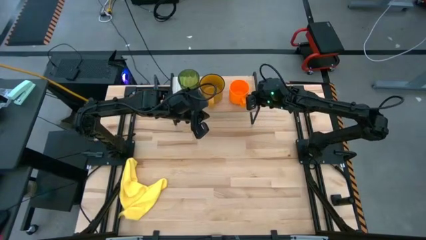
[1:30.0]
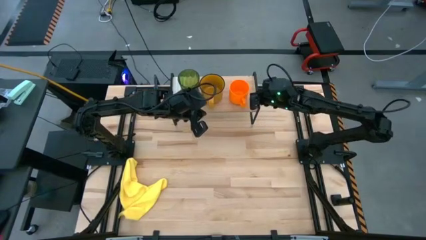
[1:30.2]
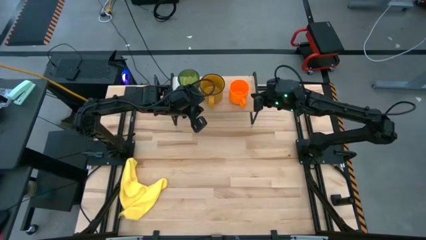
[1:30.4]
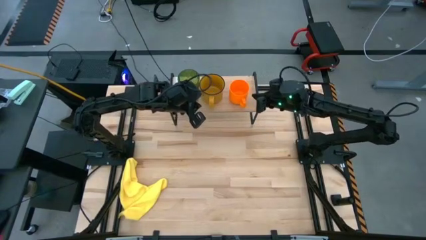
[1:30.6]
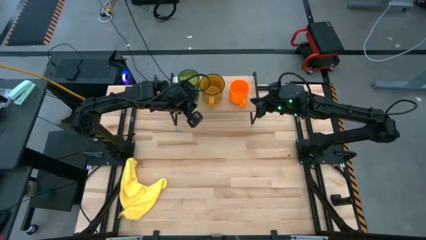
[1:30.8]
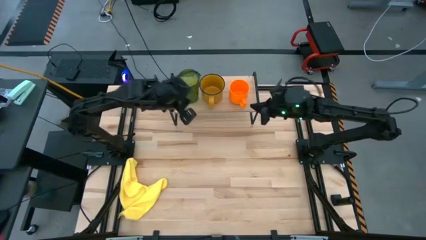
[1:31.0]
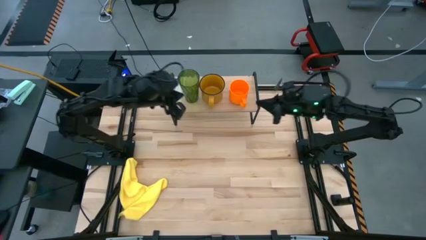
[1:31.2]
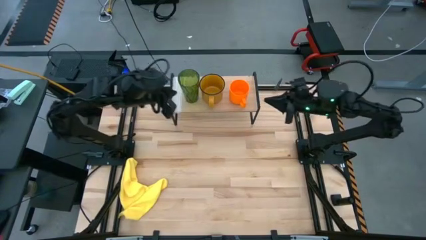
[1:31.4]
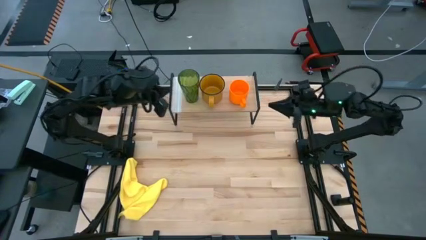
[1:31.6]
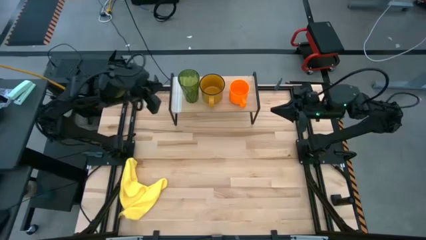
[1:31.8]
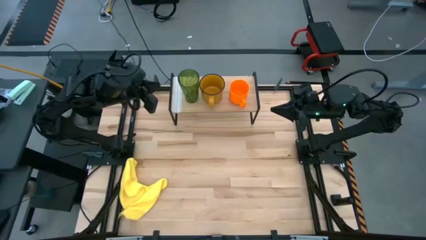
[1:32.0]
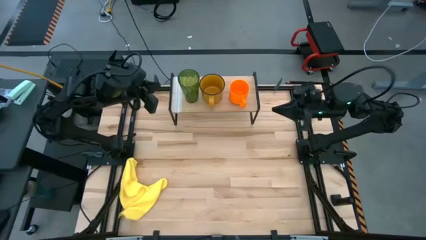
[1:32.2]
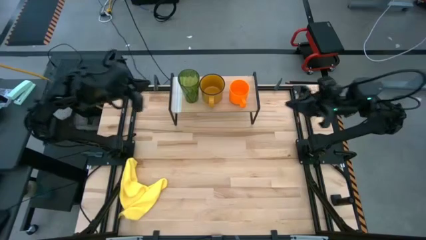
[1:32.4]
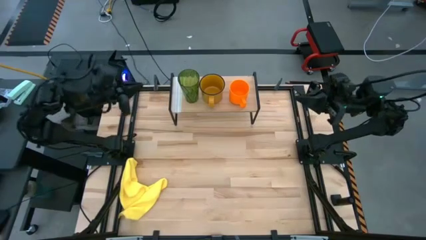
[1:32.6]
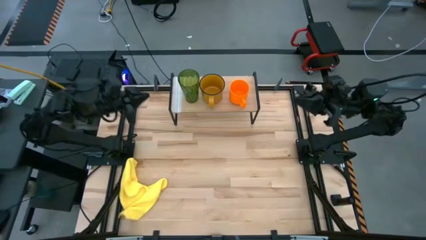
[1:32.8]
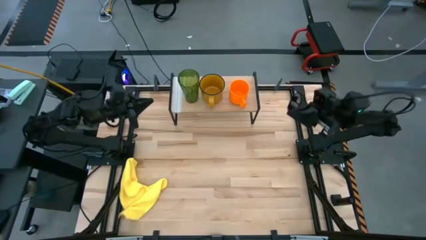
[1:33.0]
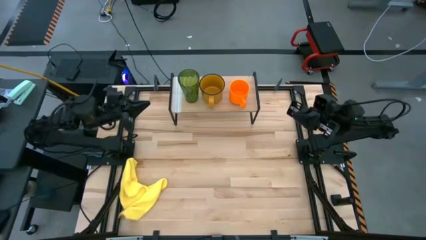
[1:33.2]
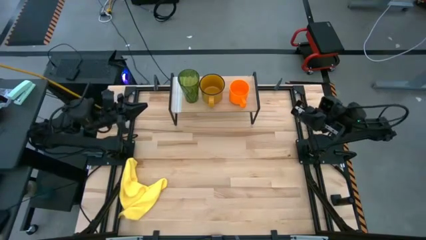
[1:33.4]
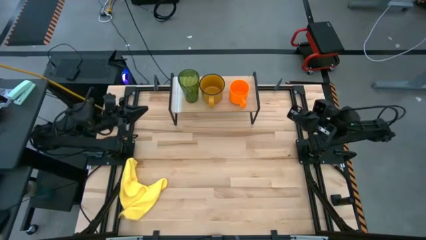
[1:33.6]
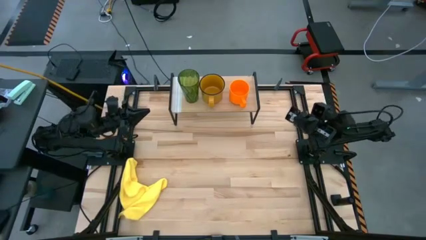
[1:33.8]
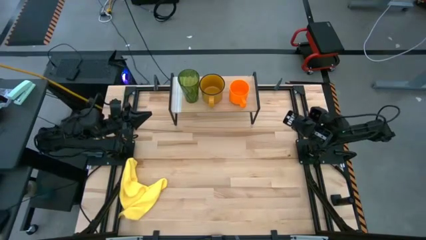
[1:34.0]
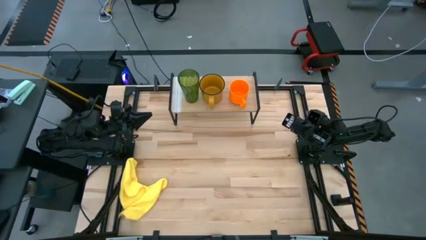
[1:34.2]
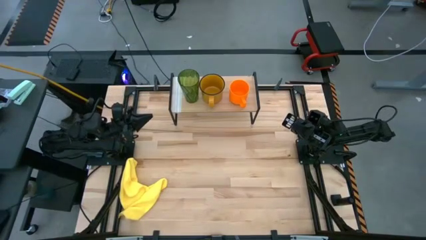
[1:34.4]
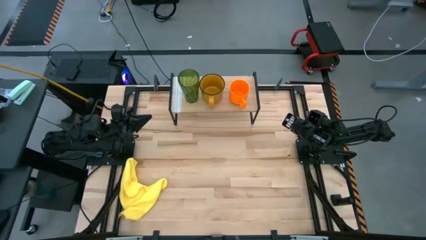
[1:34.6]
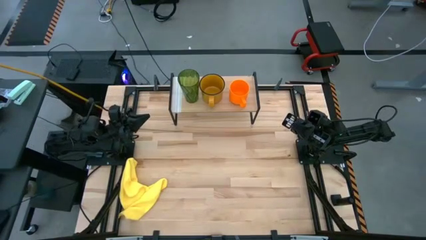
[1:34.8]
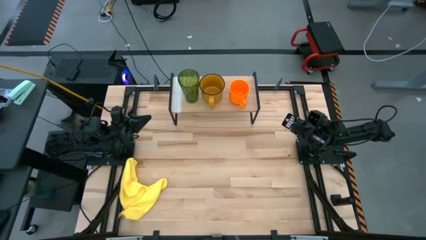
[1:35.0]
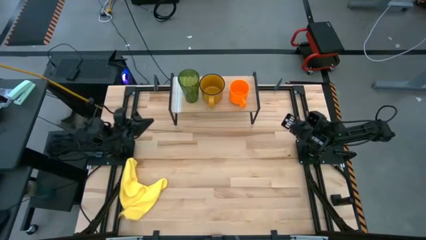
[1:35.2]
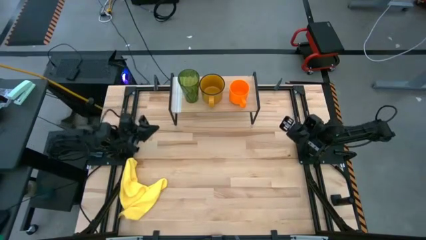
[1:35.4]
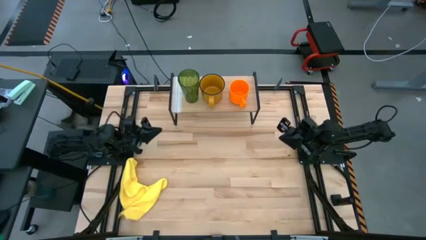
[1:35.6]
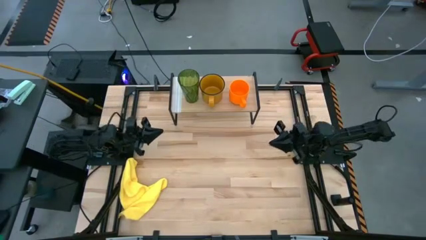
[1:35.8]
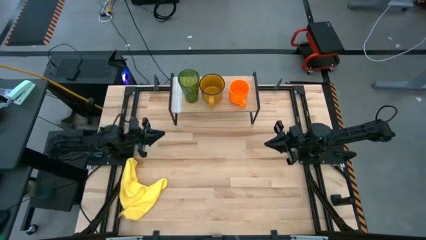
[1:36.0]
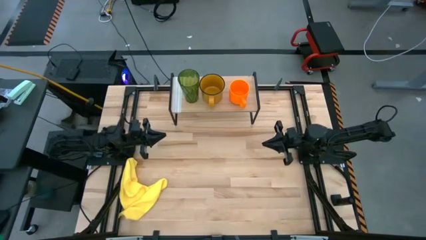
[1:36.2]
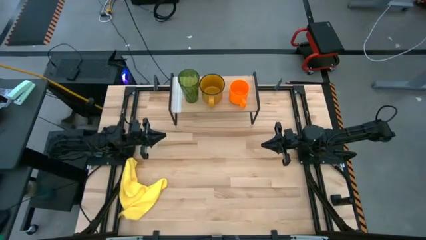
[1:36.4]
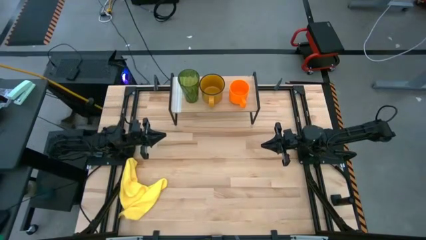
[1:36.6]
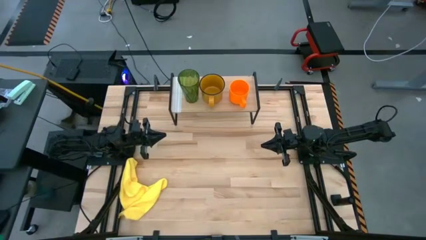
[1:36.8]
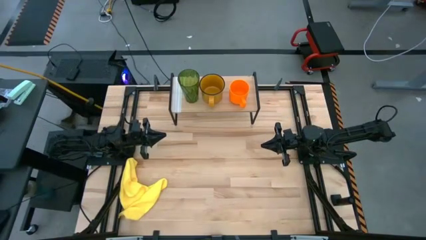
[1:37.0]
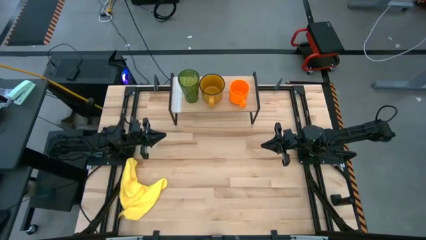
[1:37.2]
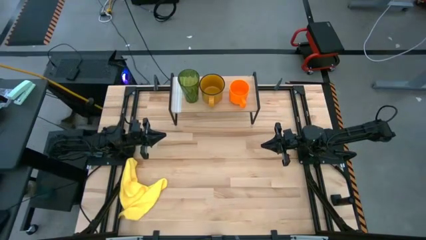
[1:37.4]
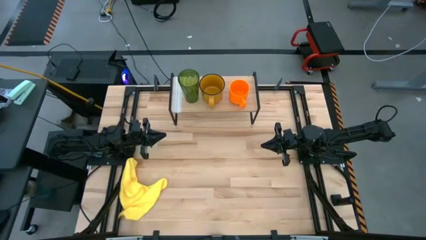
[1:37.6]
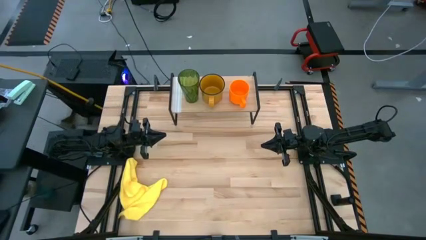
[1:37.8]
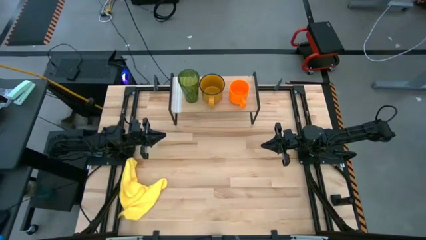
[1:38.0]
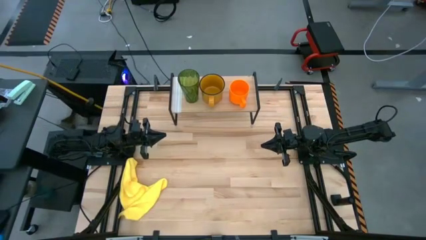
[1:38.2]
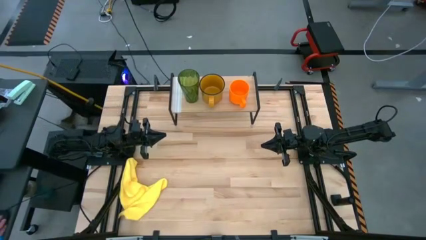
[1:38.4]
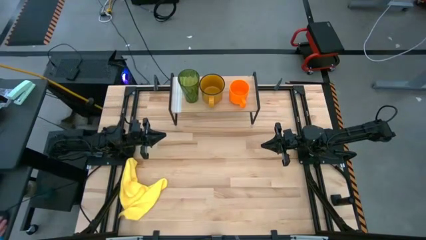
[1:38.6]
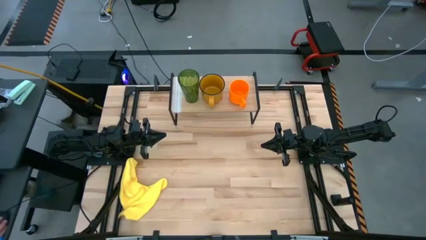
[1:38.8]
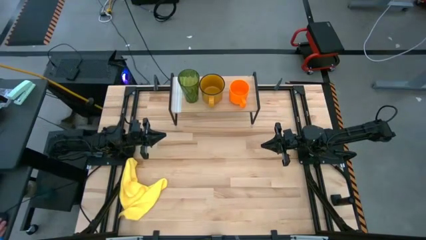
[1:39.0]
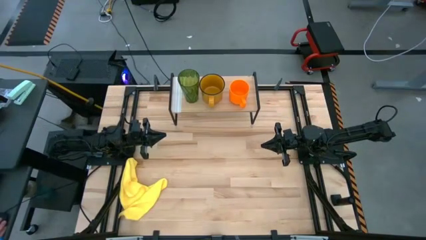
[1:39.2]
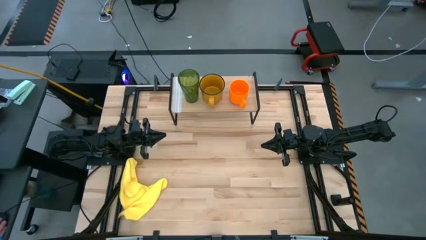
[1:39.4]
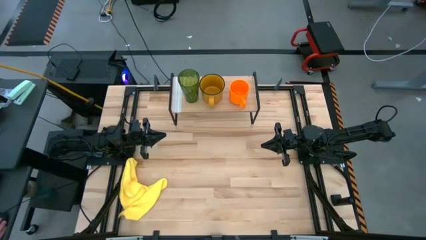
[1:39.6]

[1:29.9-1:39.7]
Task: Stack small to large cups/mugs on shelf
Return to Home Position

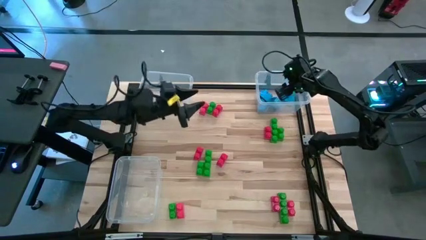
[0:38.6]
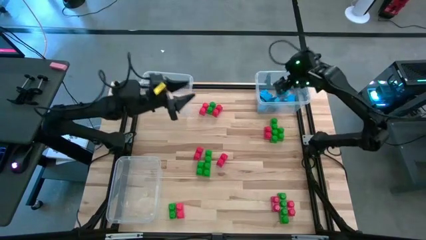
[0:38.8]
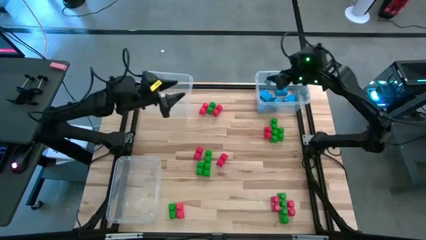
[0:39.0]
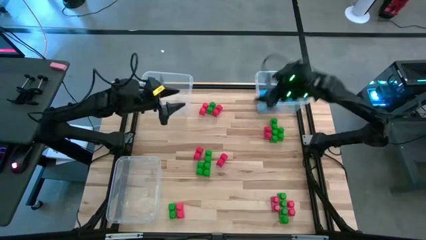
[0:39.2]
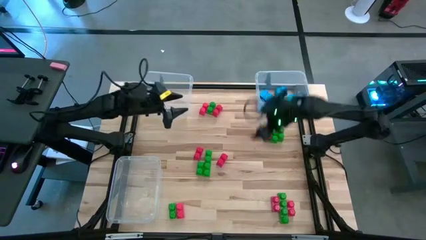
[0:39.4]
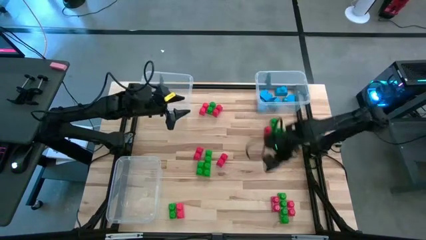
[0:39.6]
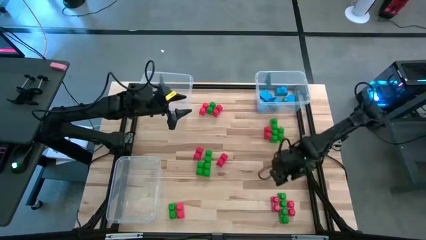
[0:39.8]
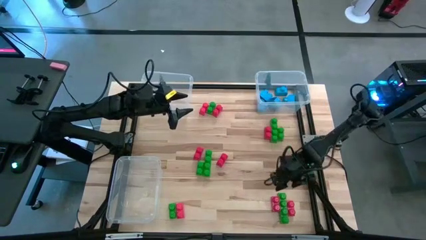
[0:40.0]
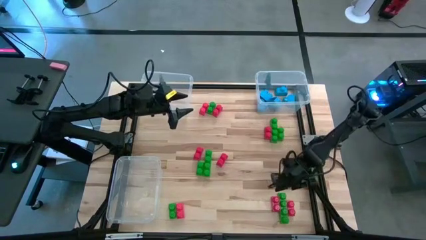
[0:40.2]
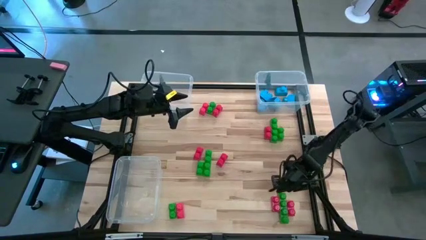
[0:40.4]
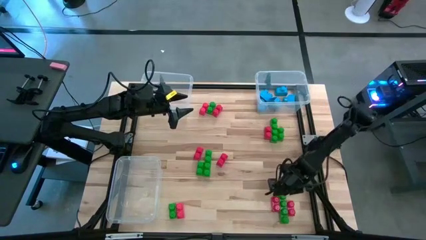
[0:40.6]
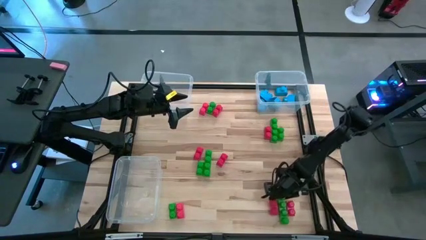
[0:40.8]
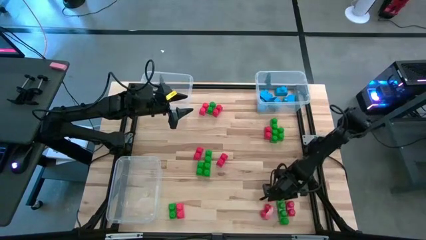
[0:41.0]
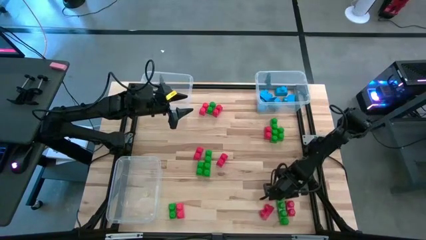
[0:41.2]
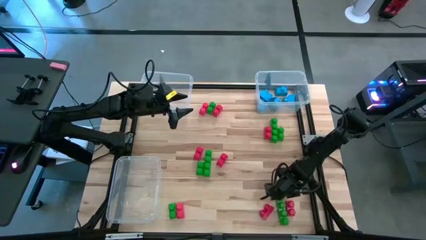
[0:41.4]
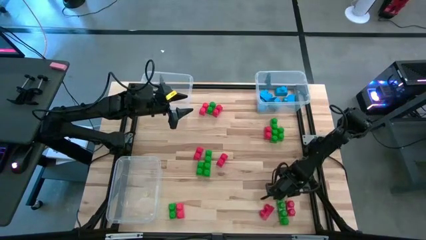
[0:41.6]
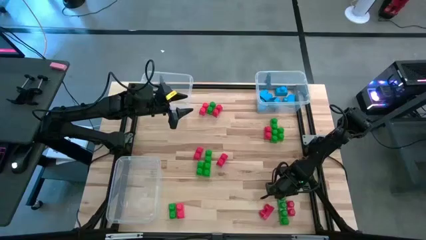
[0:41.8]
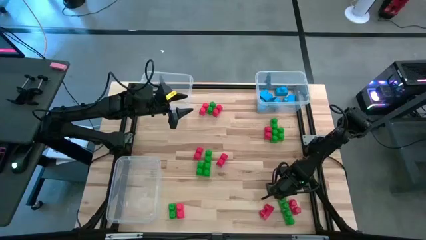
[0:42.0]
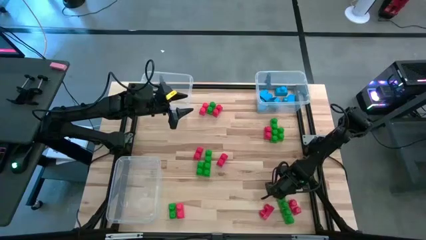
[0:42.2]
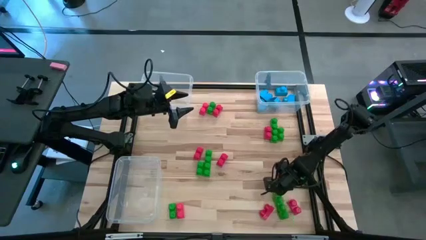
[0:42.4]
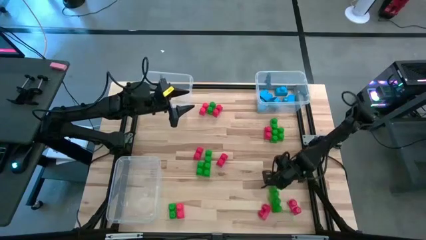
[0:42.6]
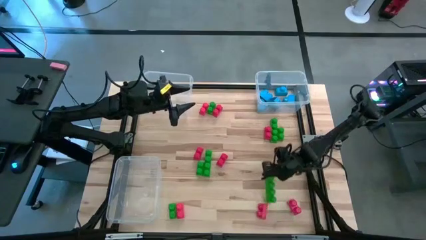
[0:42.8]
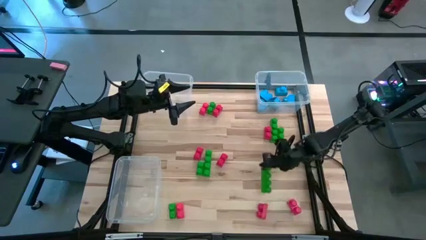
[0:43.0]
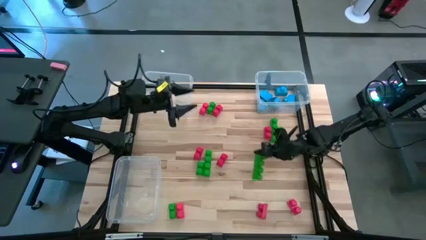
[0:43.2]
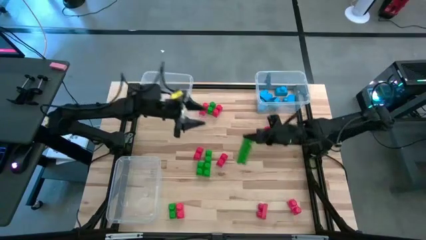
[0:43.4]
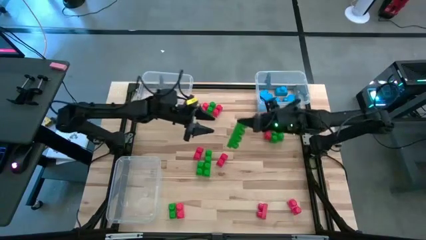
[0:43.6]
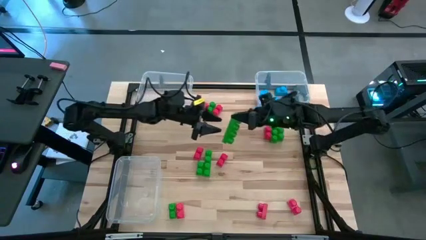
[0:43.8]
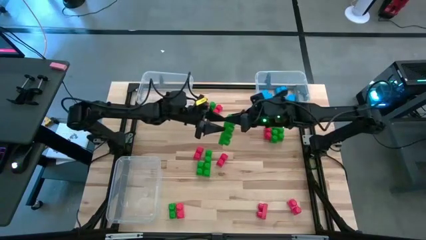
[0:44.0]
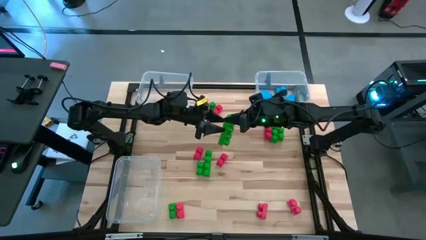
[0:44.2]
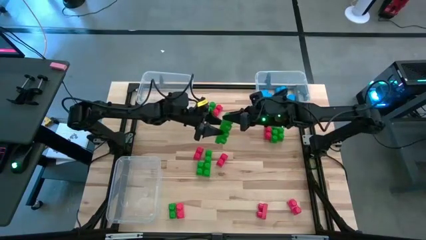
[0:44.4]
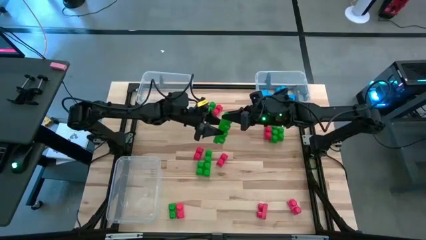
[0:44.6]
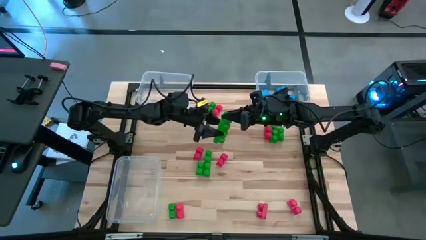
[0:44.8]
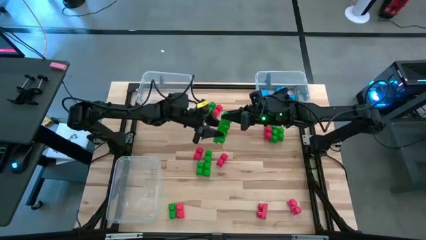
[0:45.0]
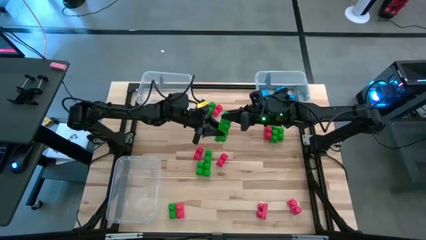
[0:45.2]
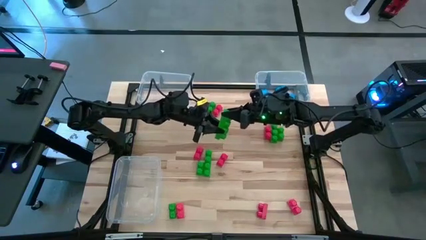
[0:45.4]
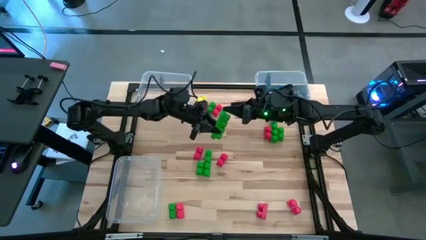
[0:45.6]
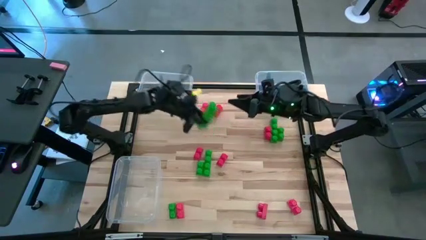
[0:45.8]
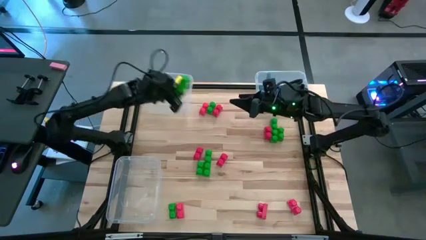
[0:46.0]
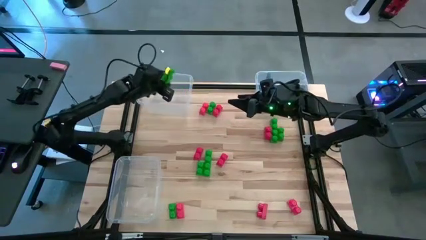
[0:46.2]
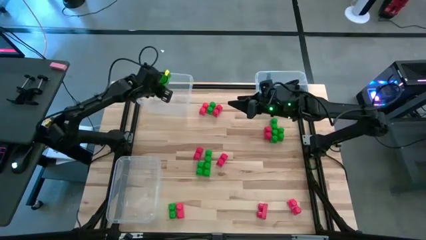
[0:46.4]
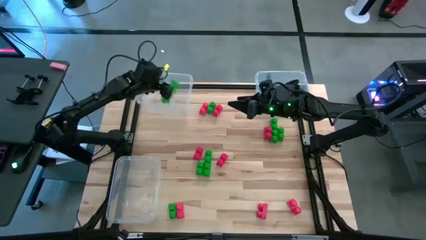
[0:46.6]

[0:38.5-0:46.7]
Task: Sort blocks
Put the green game piece into the top left transparent bin
